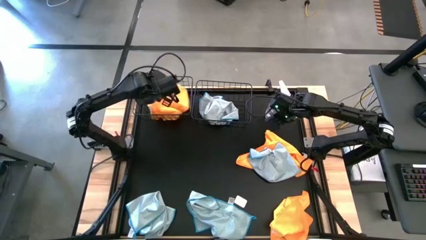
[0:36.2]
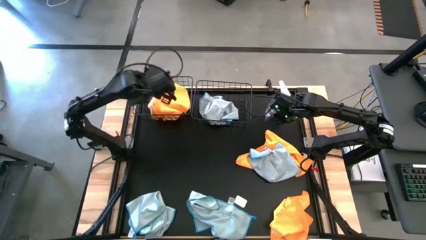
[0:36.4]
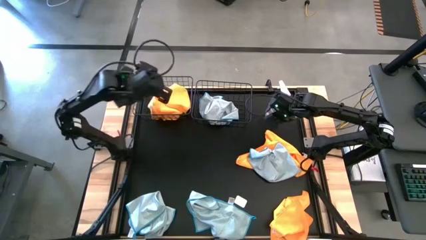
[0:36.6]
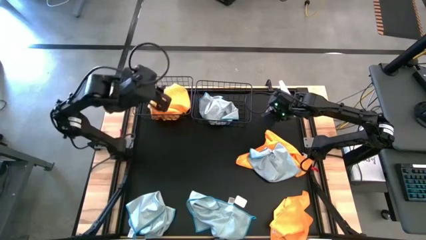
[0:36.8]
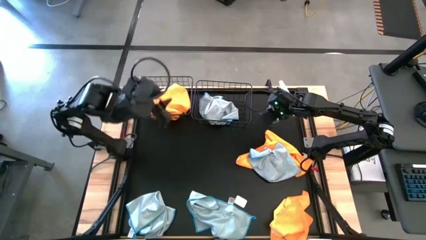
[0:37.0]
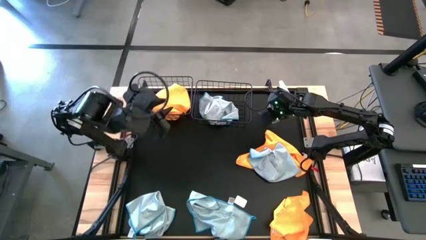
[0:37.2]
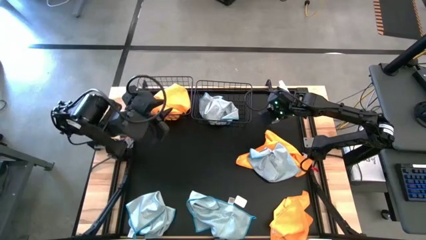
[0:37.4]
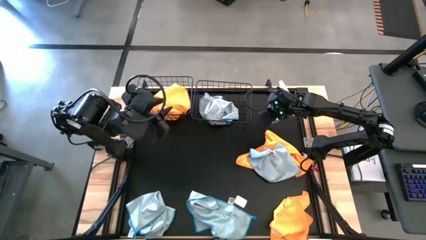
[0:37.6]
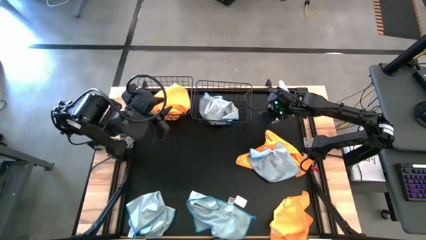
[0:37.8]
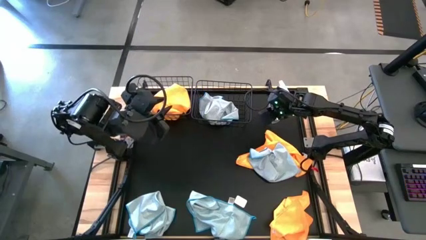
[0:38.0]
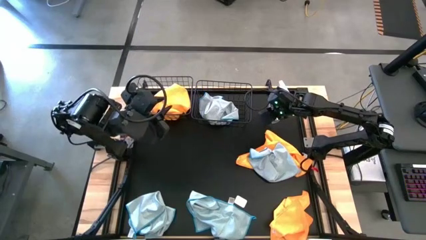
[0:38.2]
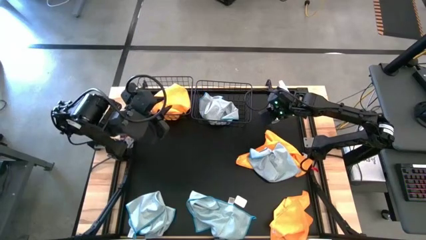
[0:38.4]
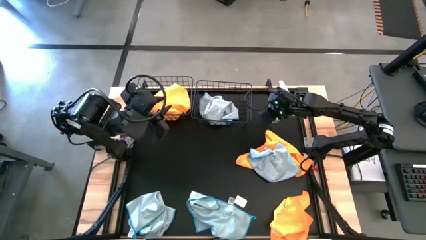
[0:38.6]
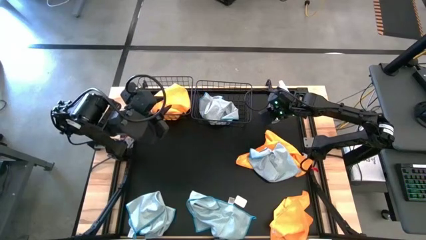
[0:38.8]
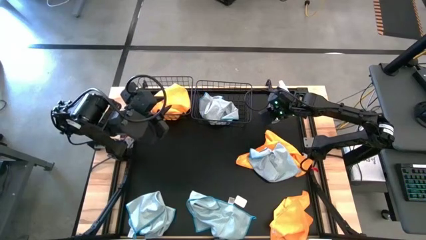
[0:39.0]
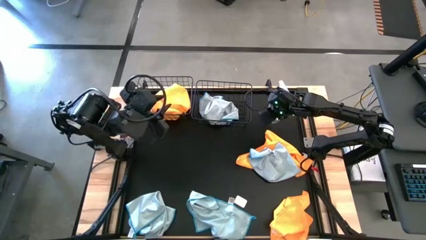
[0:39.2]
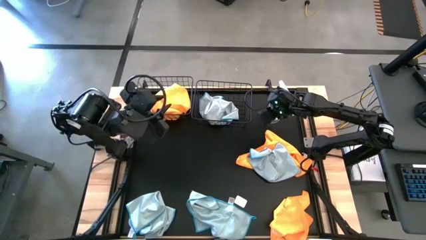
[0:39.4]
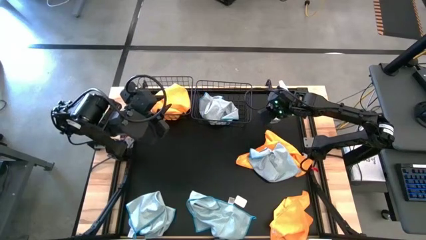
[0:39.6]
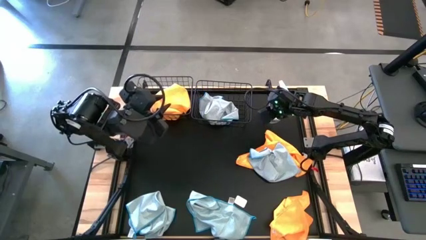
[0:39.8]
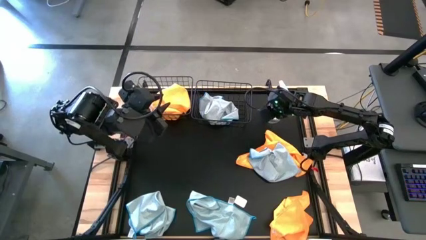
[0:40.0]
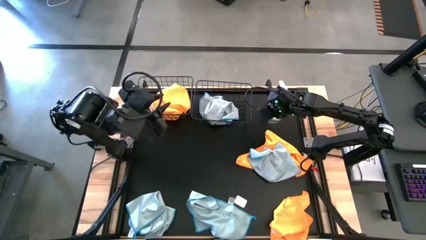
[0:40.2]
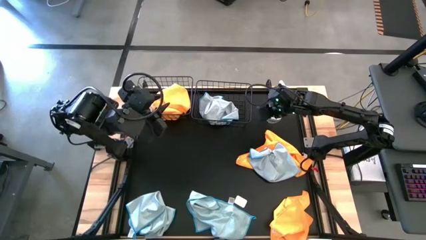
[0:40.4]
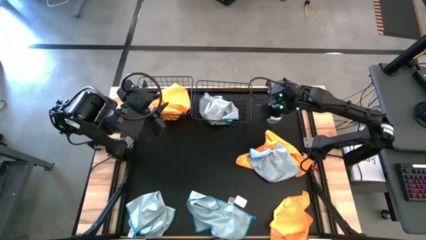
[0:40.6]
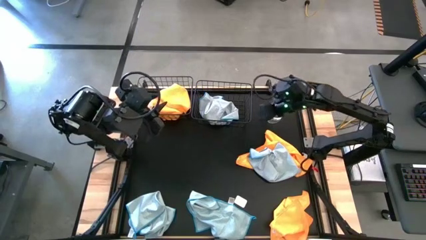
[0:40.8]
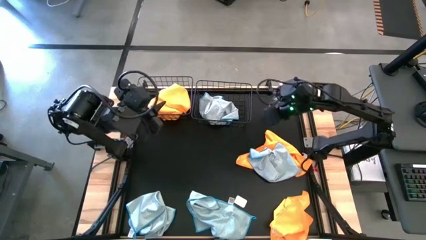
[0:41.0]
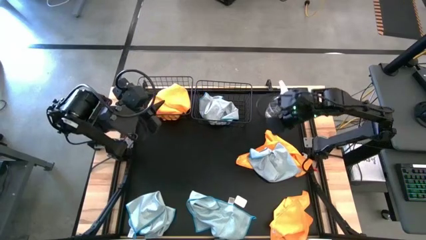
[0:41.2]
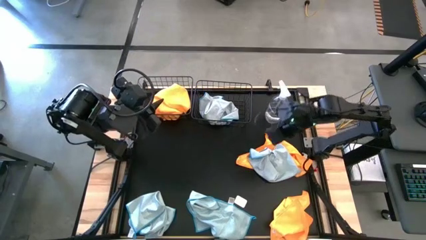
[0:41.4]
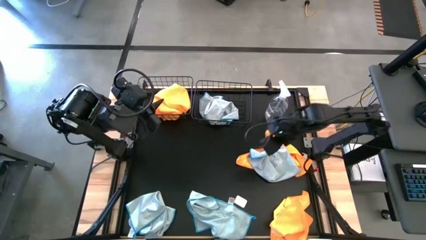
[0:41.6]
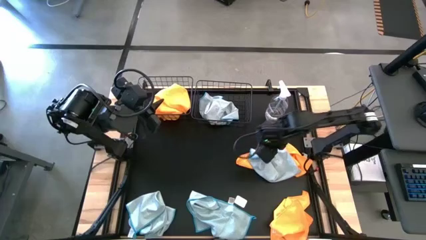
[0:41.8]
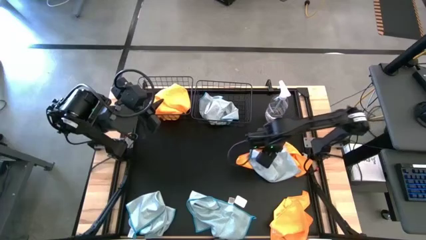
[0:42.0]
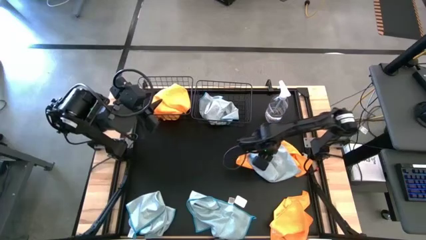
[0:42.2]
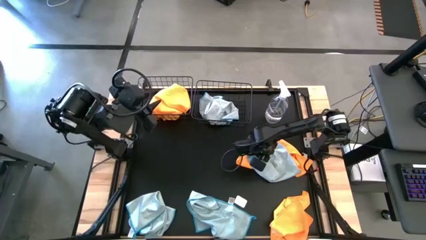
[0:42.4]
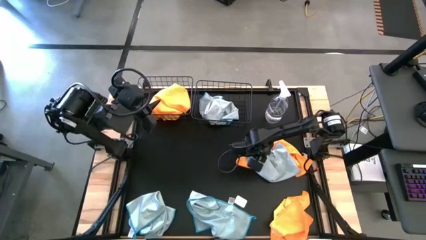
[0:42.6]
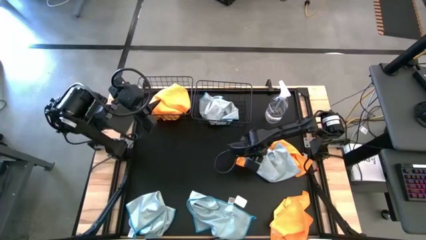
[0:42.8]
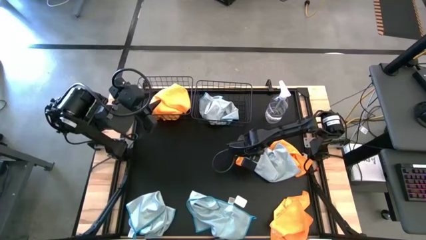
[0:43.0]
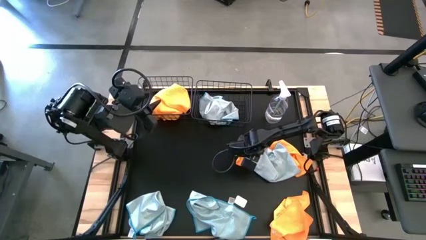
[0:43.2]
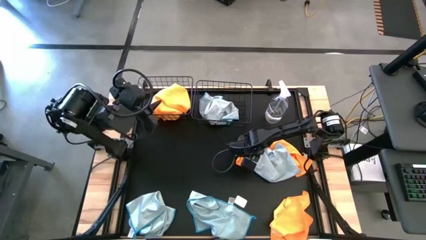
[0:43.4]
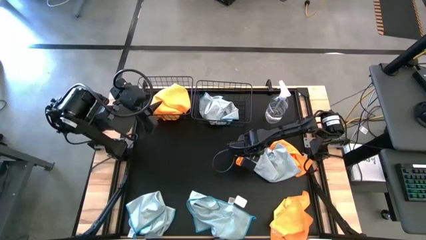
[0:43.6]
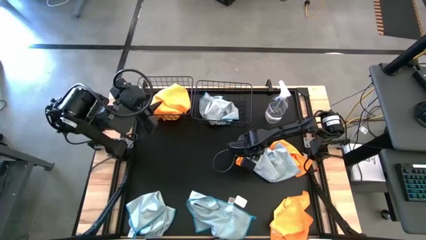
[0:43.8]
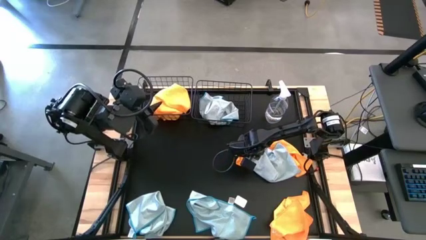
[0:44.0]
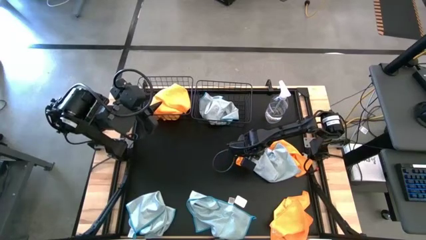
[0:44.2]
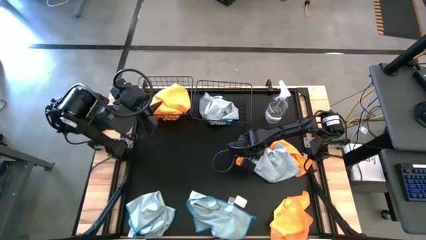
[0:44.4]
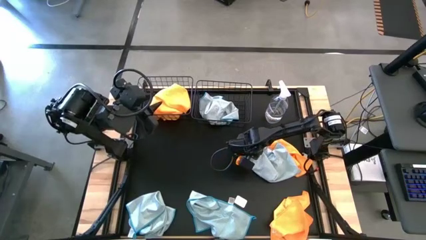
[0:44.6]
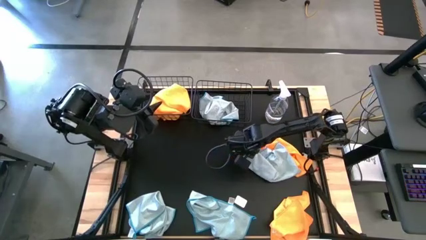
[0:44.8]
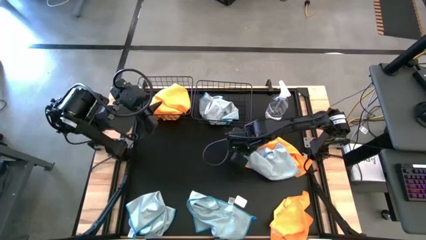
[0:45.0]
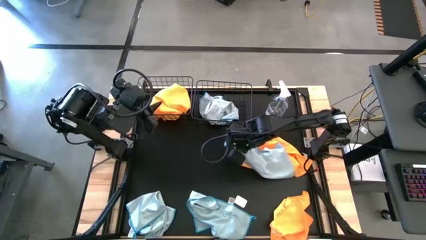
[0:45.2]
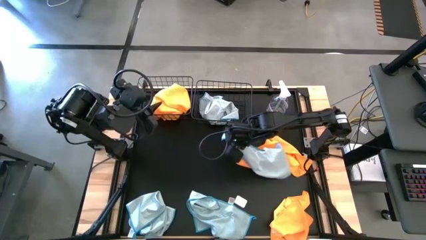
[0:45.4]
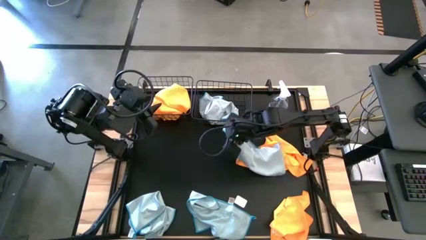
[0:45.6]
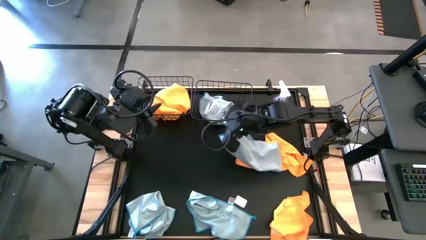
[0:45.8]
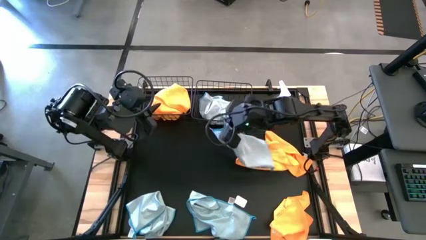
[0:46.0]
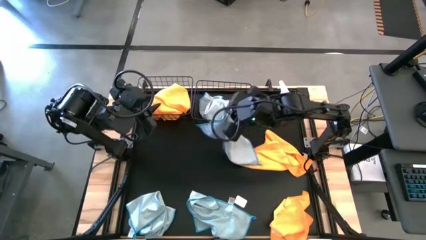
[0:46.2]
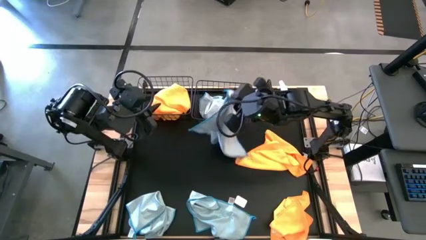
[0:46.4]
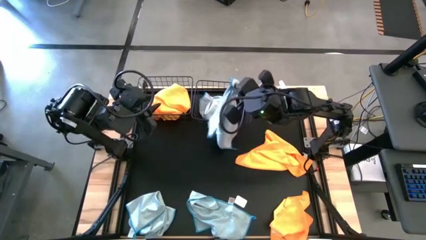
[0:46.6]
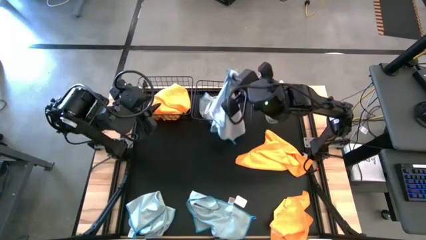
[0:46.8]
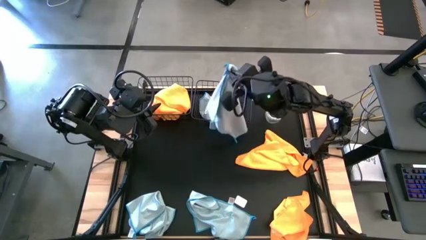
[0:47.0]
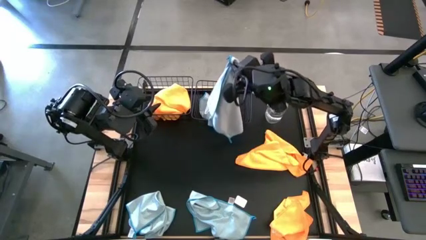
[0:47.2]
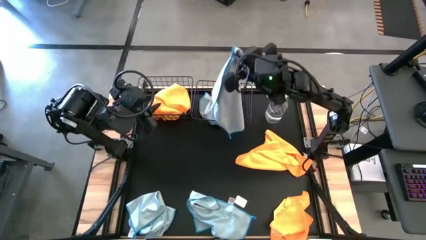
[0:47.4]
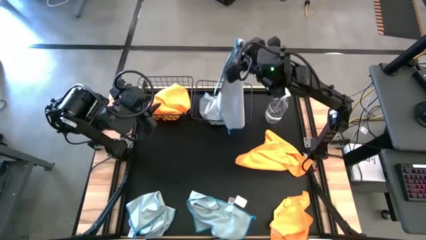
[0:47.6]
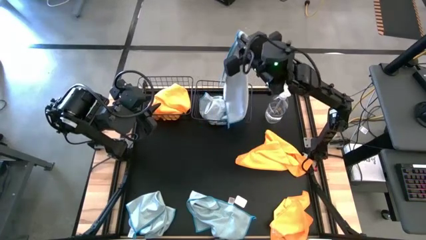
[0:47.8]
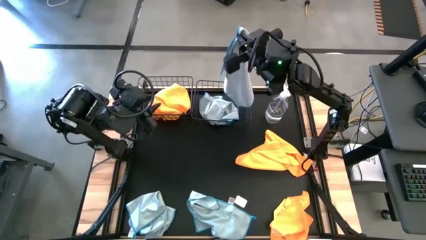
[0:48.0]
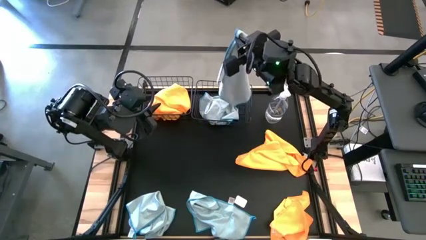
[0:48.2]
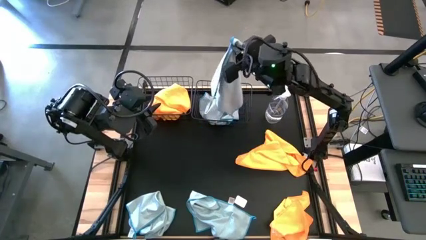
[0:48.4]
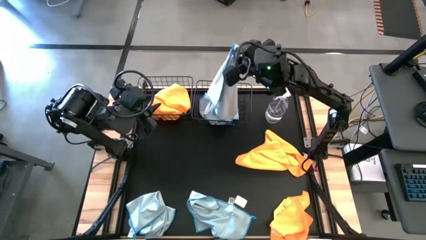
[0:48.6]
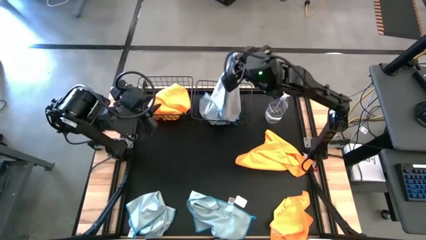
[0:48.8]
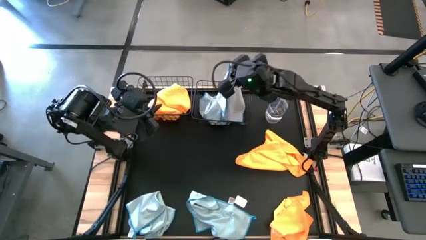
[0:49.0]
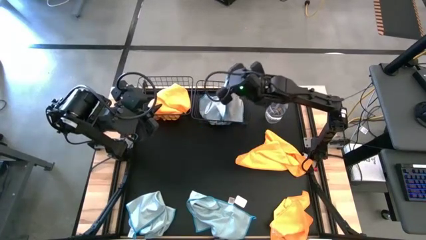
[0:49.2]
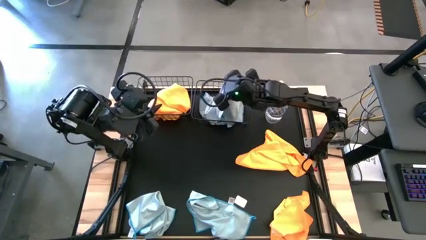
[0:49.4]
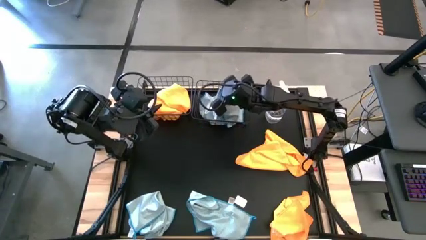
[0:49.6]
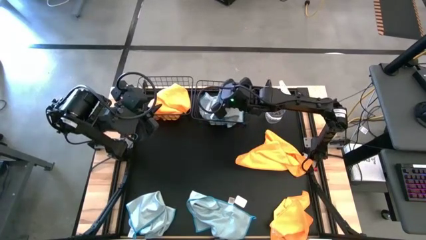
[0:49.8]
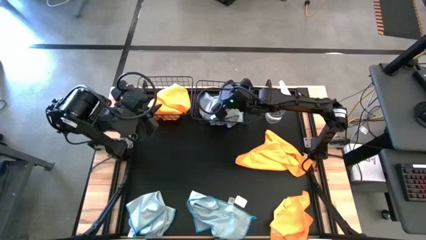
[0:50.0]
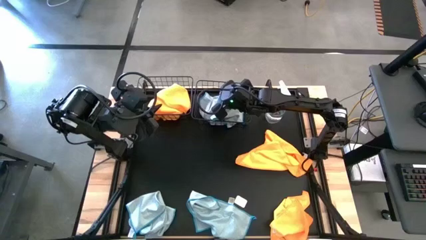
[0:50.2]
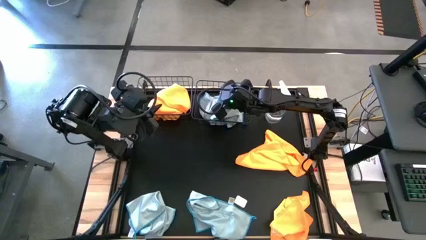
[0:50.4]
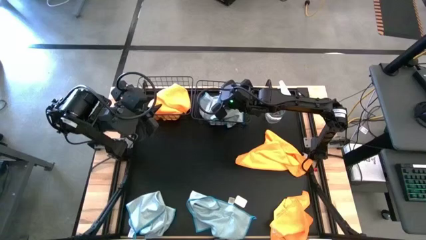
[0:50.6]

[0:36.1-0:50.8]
Task: Sort microfiber towel by color & place in baskets
Put the blue microfiber cloth into the right black wire basket
